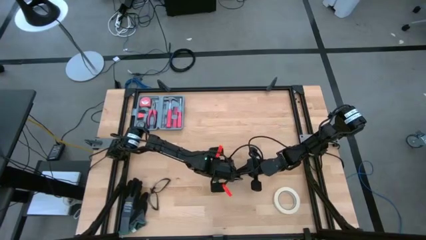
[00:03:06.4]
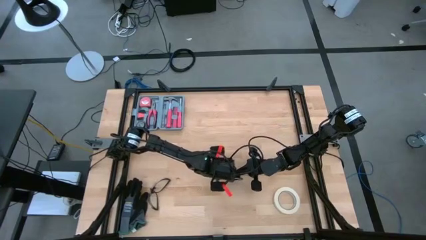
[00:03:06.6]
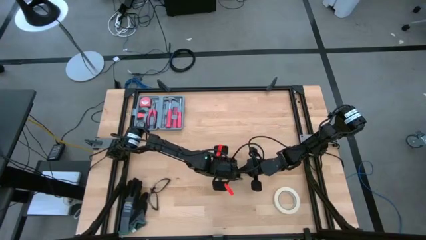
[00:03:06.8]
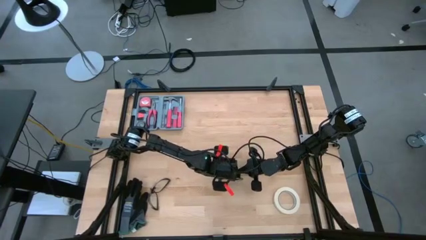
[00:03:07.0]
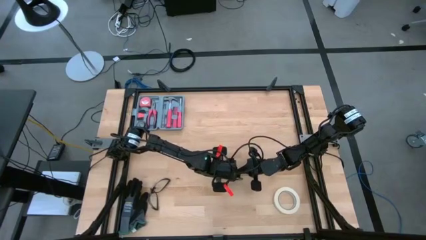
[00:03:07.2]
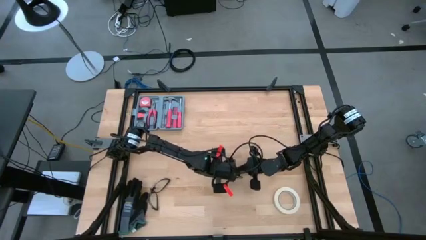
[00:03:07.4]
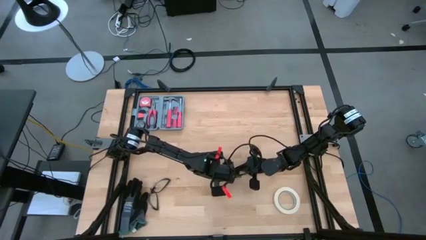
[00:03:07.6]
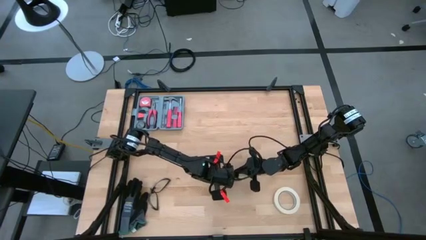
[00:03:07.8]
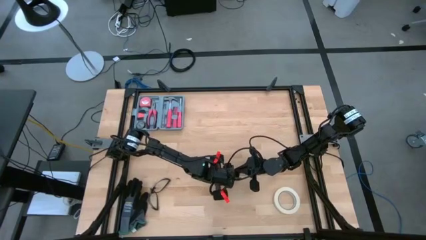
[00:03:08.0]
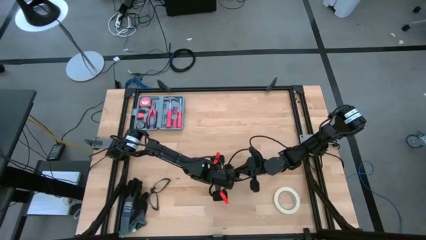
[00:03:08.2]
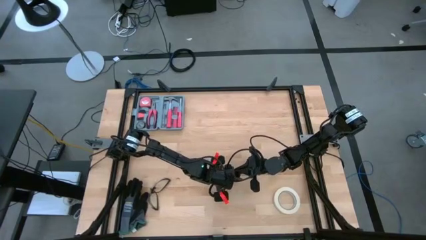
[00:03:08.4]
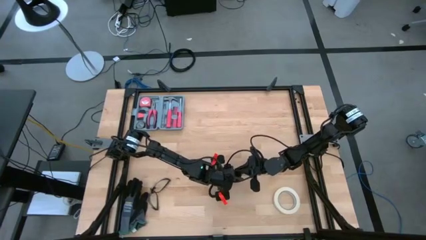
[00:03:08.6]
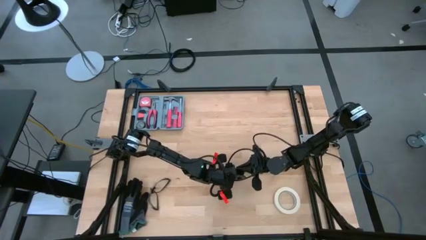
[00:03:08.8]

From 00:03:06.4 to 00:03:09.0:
Task: Coil cords
Coil the black wire onto the spool

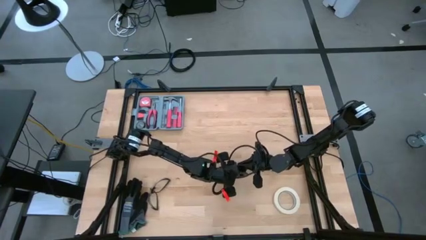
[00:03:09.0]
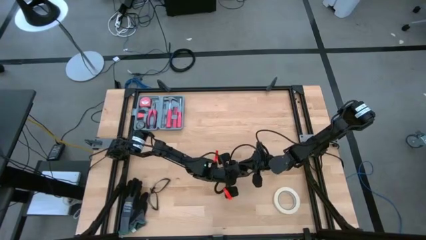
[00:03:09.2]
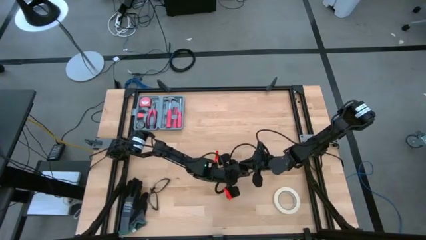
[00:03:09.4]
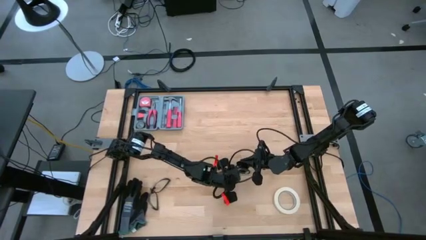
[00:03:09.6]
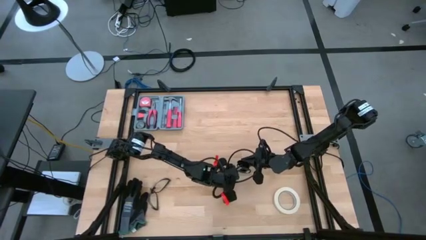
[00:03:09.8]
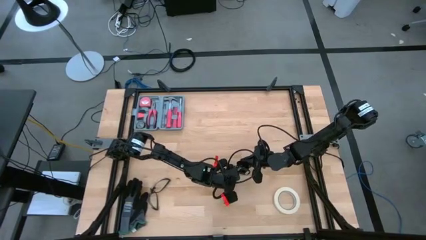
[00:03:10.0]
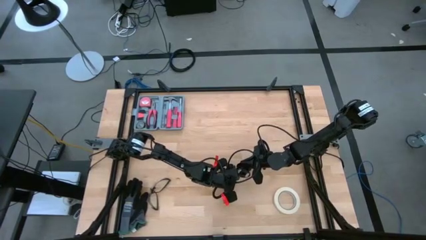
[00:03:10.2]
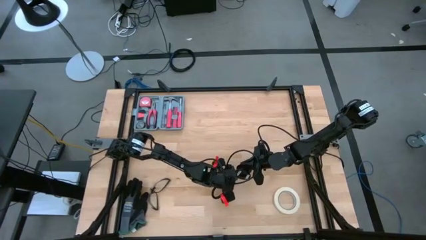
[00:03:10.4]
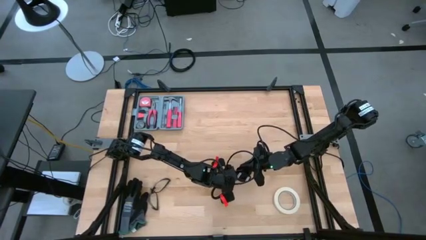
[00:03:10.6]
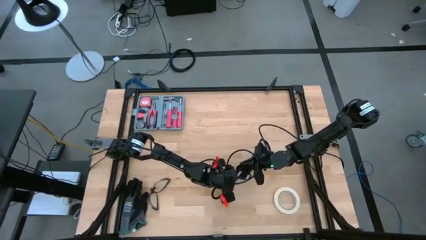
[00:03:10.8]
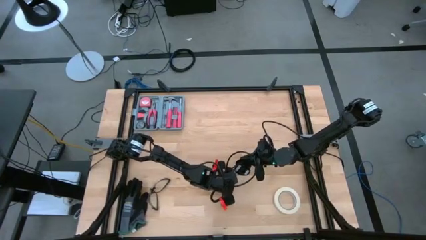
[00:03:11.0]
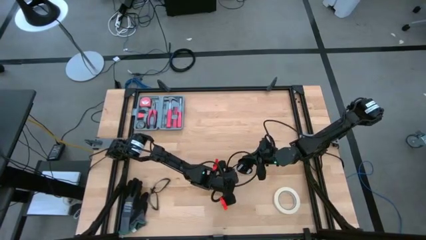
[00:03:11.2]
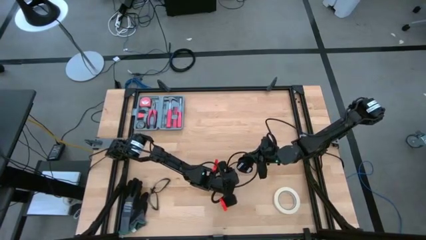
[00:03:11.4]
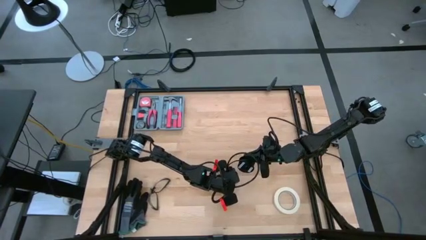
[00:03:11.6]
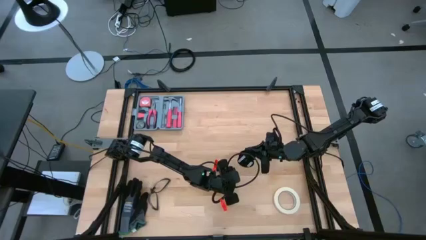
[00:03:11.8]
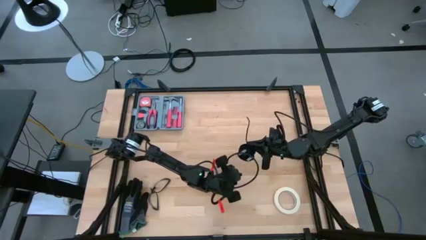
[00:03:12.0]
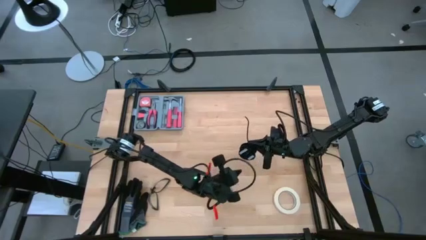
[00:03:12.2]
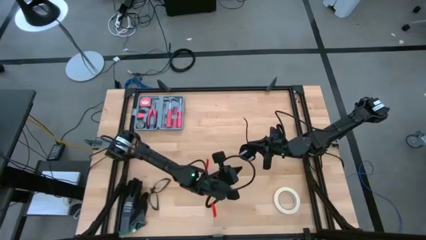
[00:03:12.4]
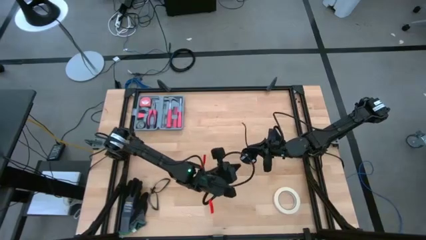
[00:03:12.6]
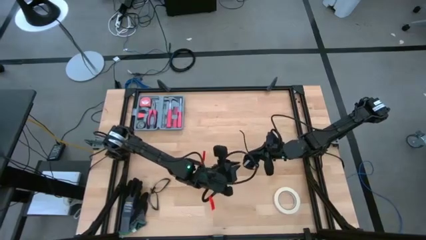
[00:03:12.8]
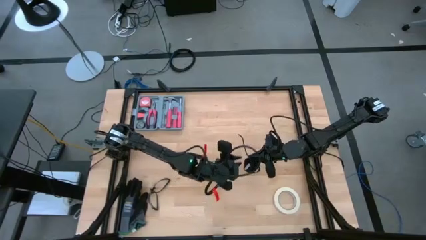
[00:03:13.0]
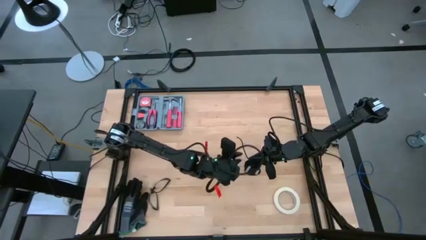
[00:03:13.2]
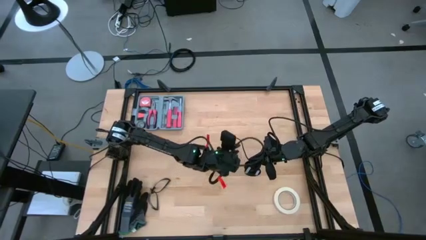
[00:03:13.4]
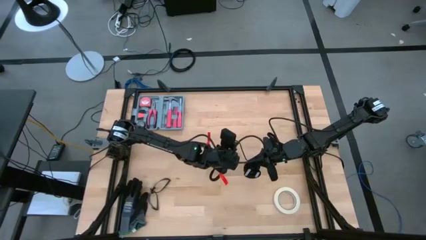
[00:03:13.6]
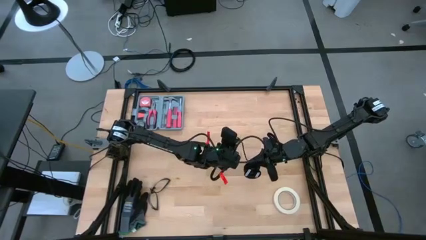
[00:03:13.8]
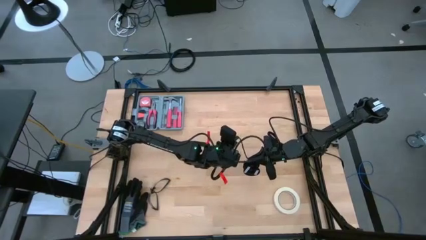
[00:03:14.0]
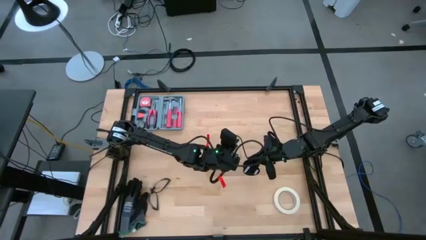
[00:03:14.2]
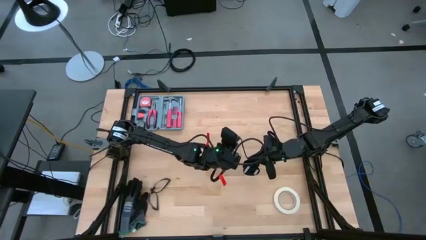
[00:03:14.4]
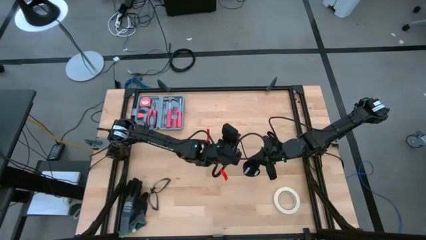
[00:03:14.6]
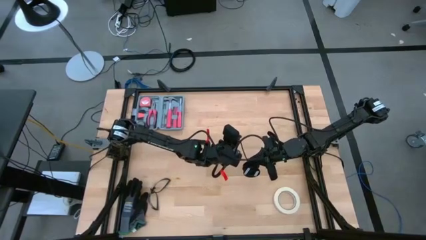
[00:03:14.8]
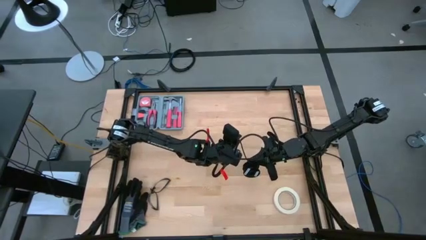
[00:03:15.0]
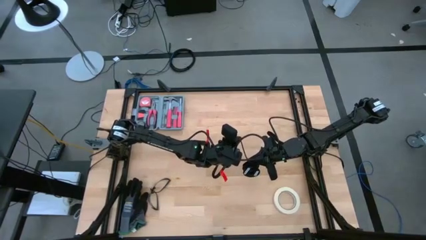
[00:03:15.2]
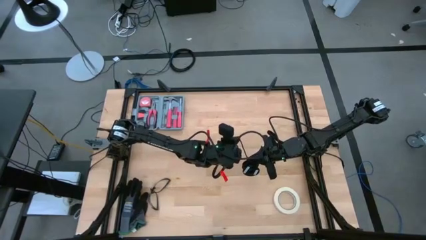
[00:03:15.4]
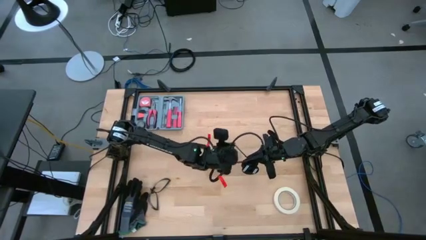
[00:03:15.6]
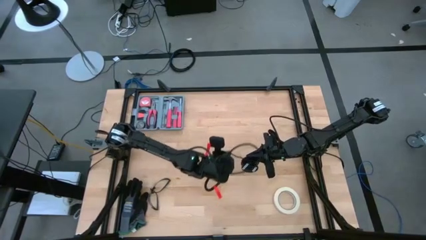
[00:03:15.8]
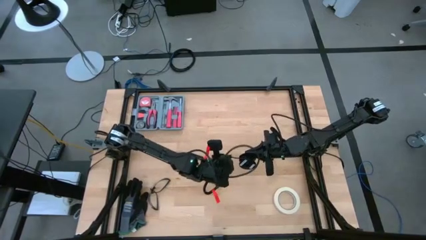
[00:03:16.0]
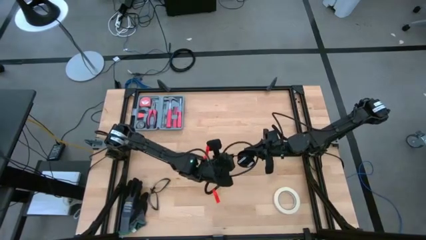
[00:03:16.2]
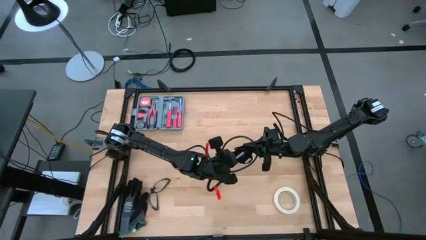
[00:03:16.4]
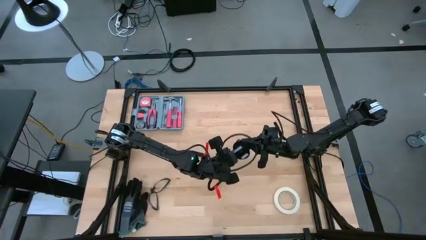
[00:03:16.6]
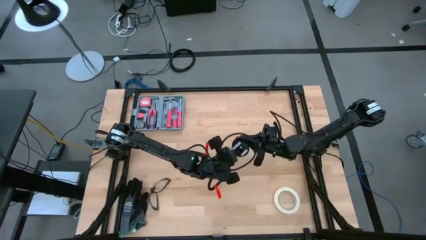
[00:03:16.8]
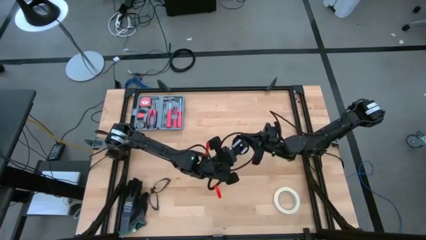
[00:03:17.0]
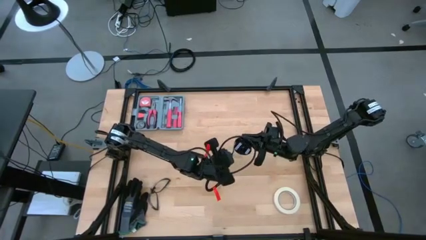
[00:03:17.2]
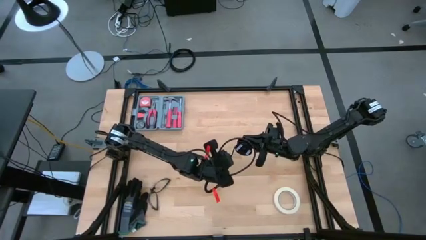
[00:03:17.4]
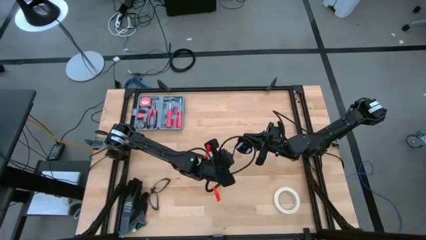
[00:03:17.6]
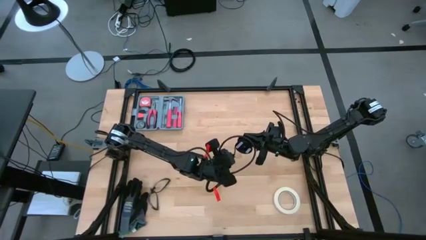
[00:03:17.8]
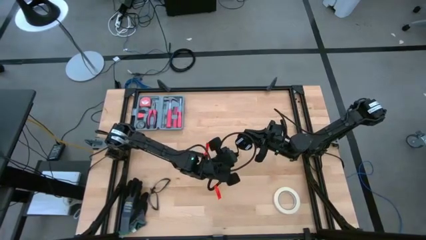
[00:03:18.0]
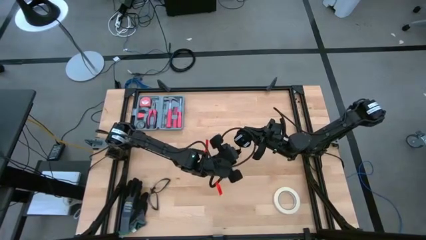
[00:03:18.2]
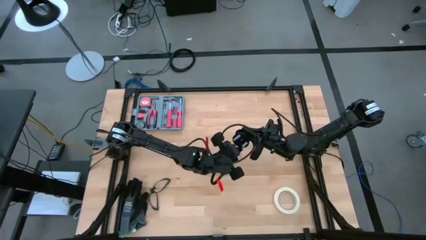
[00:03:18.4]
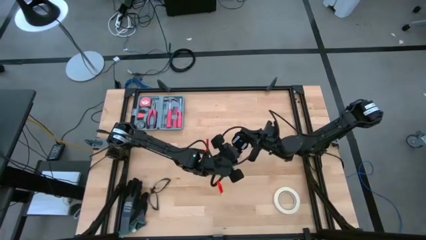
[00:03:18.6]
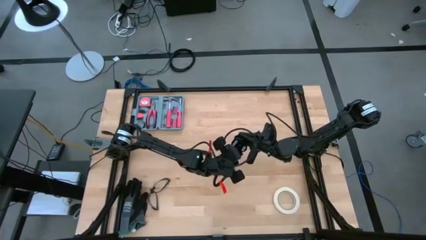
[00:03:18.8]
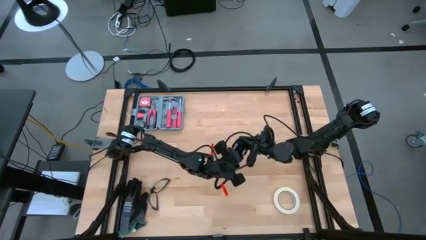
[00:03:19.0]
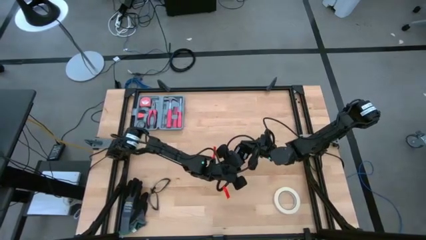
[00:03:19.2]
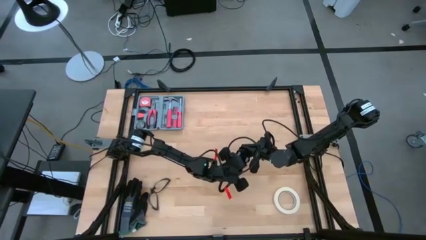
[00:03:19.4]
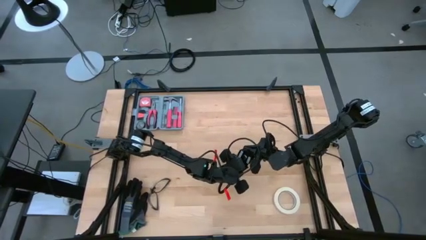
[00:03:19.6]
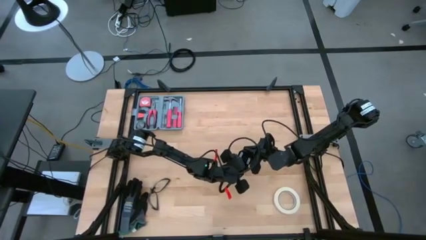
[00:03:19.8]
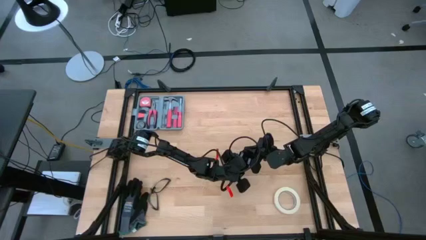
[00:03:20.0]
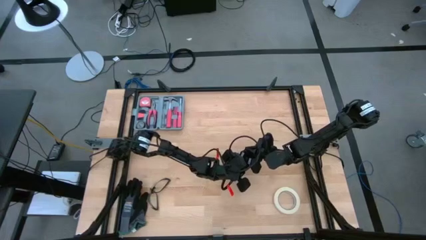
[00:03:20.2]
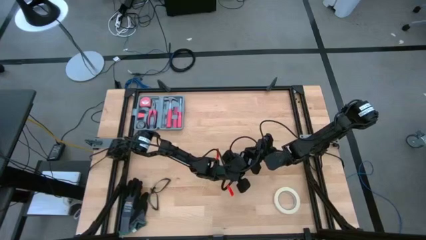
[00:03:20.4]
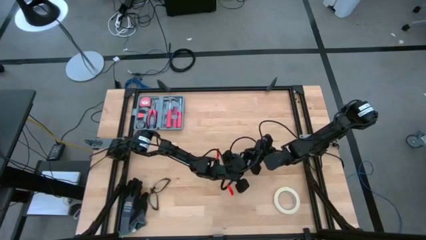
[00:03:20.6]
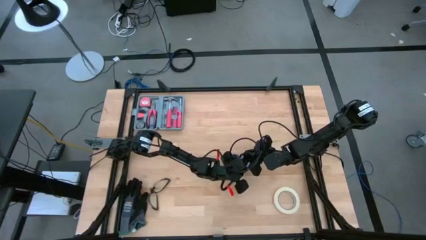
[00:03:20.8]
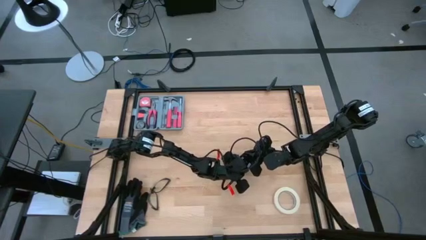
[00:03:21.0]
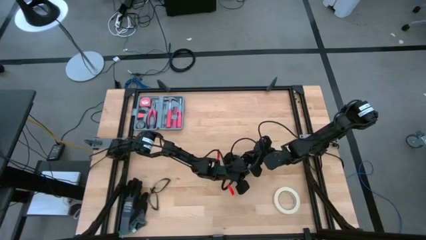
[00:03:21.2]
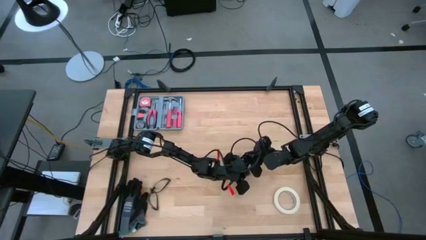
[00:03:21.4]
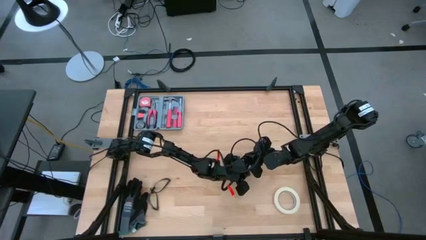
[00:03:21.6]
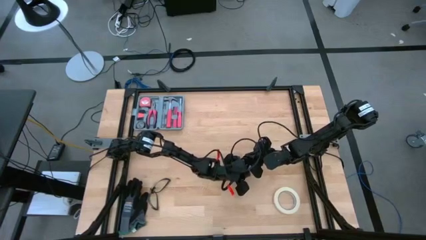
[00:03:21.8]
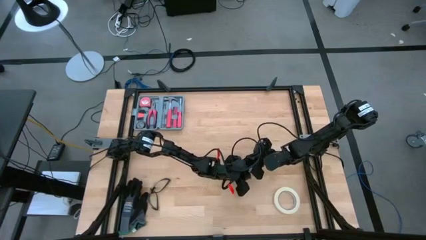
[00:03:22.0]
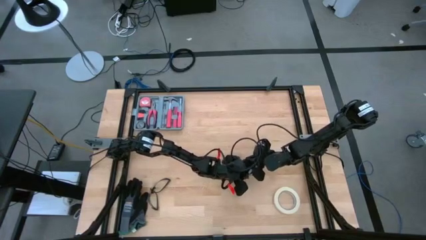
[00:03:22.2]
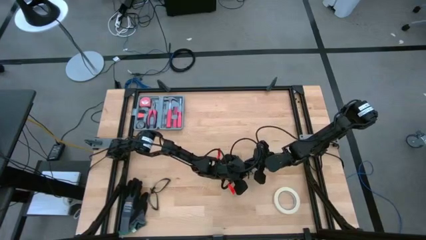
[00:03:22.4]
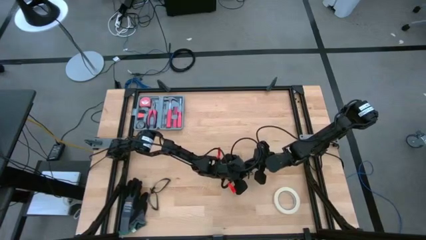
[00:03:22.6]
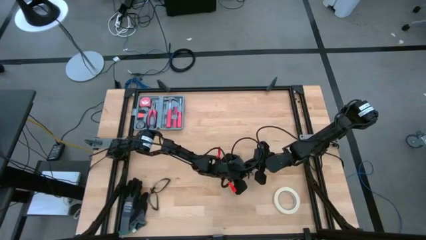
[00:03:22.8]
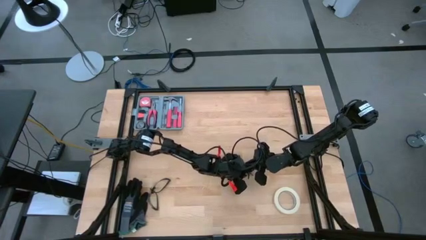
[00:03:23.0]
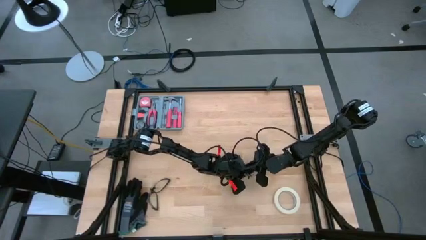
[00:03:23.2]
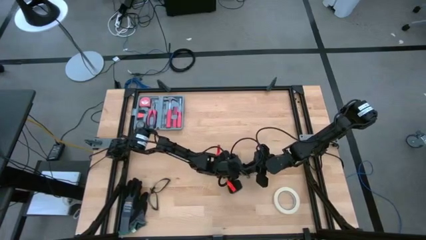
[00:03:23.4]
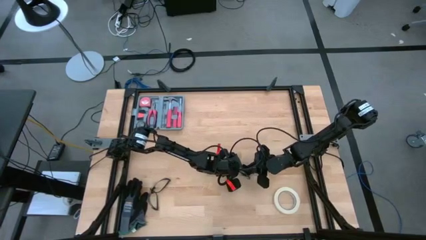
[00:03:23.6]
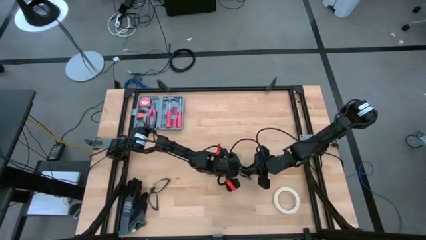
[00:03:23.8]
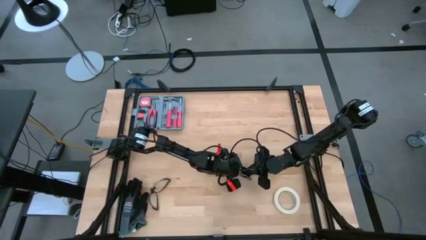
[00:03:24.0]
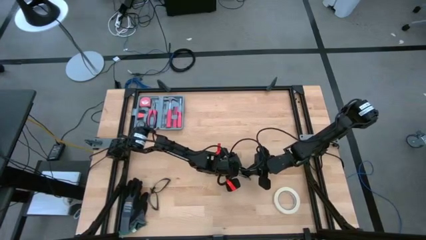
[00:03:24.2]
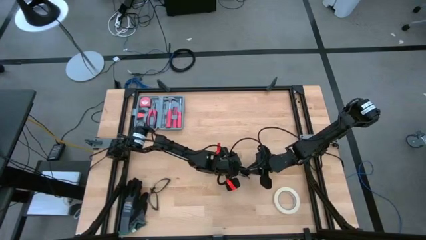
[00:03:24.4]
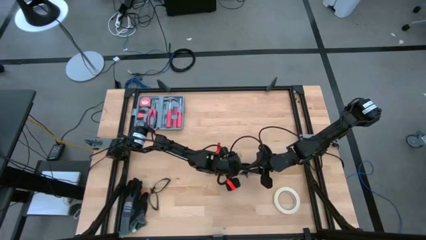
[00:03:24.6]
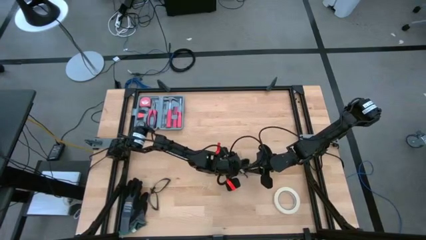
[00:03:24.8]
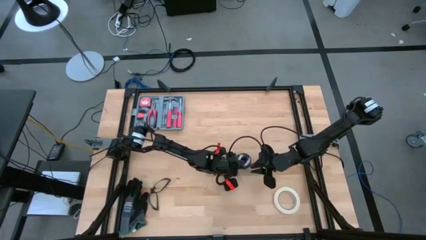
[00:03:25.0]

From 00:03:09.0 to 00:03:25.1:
Coil the black wire onto the spool
